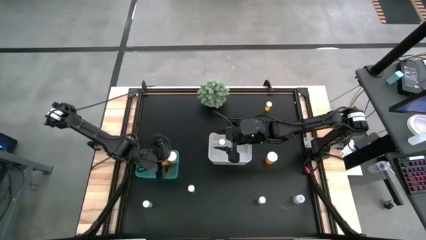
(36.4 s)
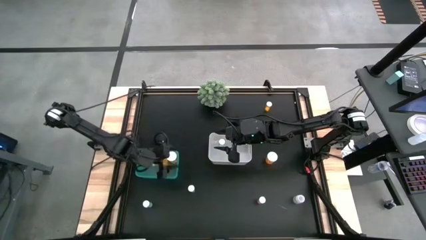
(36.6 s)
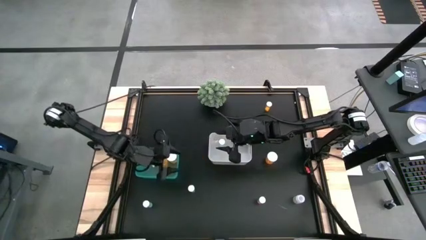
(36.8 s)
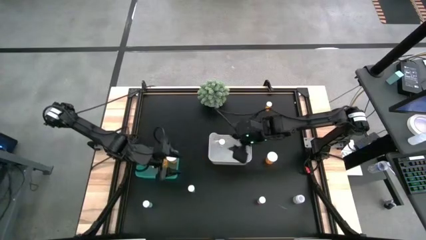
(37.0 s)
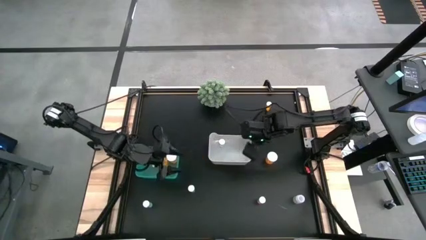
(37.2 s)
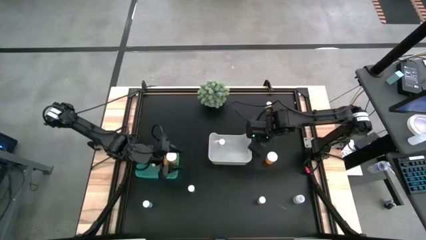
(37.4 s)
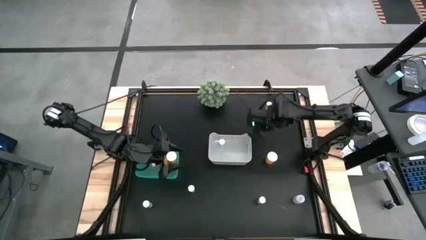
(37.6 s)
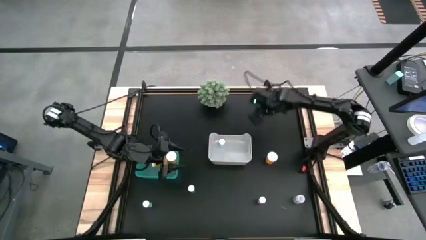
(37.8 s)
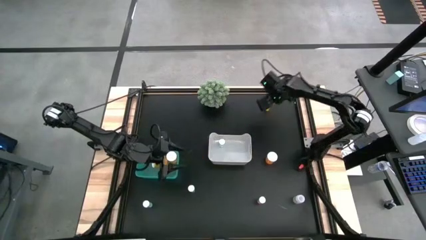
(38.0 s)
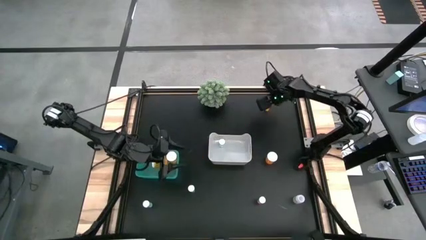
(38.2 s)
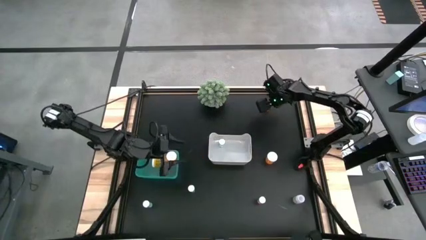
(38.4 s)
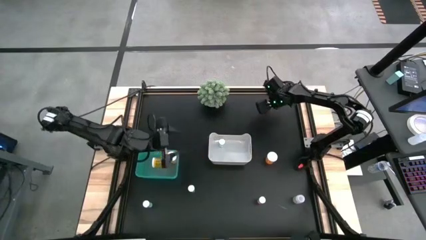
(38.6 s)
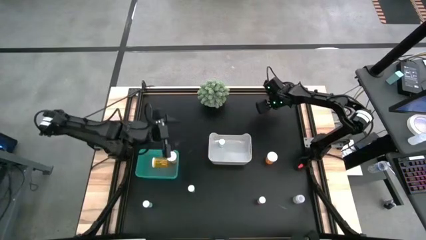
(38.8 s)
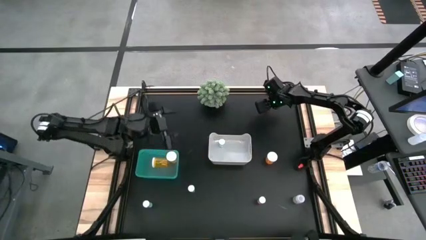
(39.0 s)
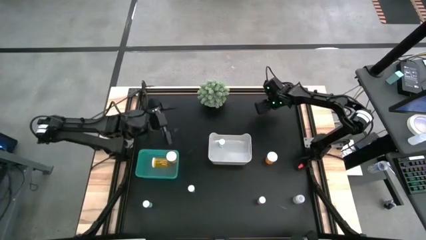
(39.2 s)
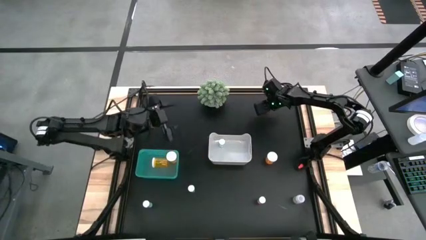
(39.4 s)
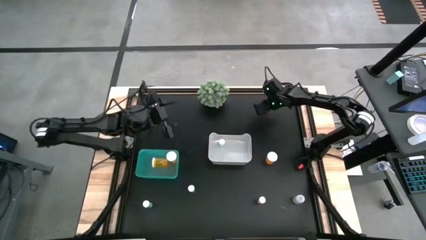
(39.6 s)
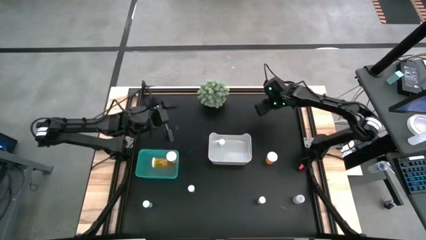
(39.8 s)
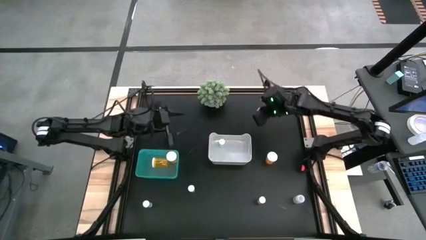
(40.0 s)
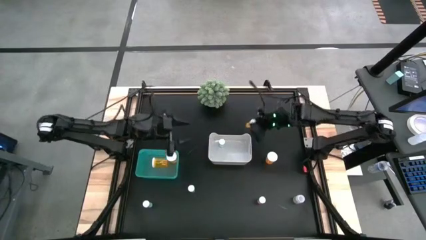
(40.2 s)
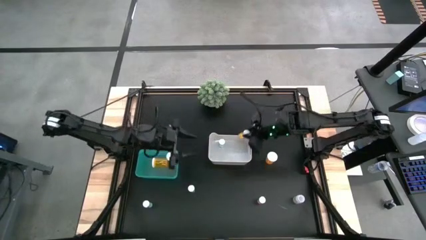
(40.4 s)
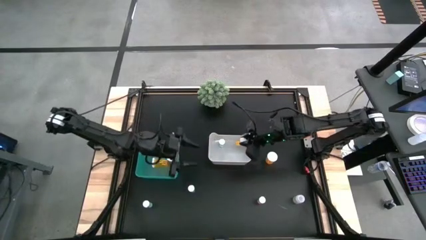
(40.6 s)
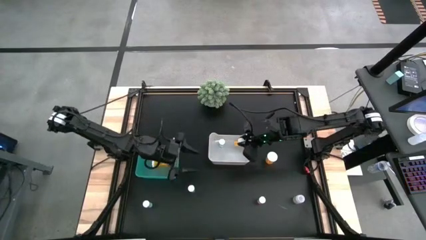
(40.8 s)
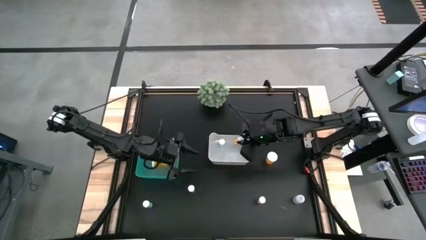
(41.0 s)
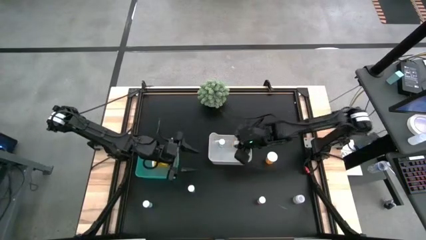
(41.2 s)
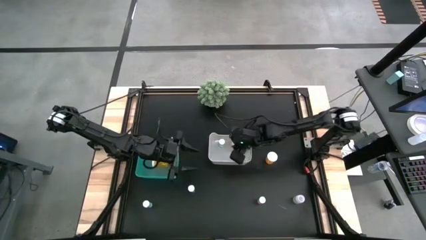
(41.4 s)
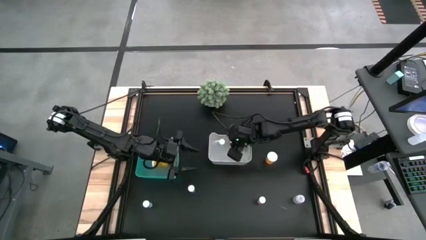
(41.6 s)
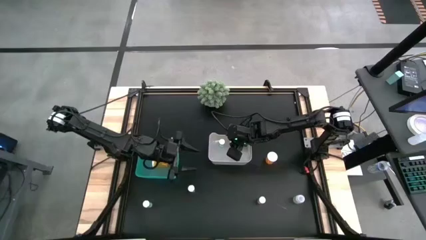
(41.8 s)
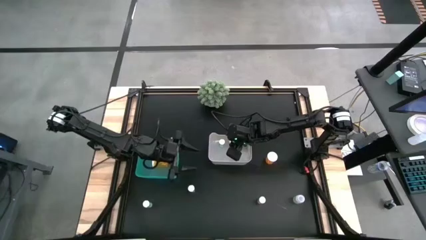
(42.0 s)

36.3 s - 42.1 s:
Task: Pick and place medicine bottles into bin by pill shape (circle, oval)
Put the orange tablet bottle into the white bin

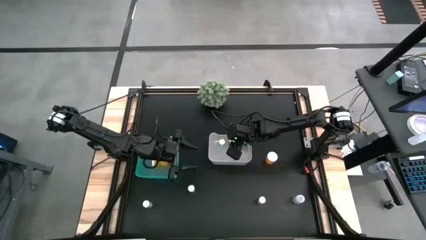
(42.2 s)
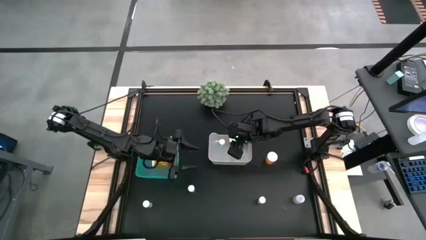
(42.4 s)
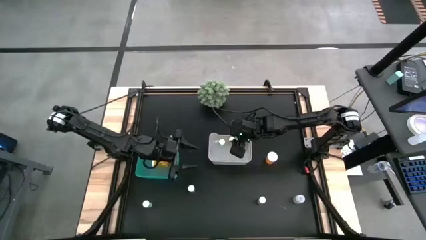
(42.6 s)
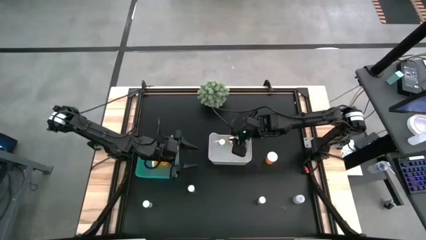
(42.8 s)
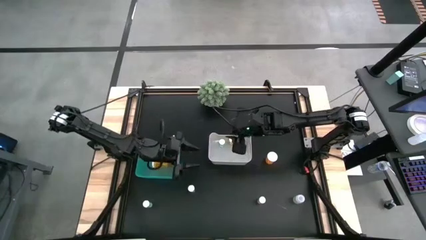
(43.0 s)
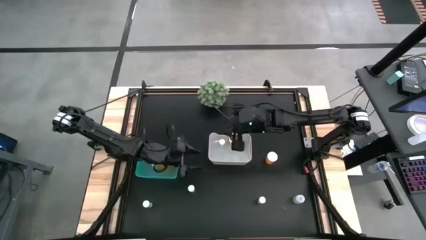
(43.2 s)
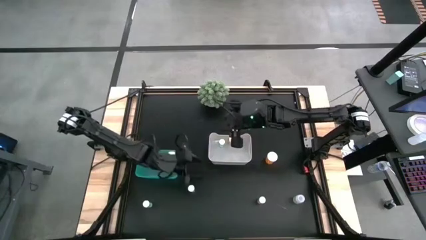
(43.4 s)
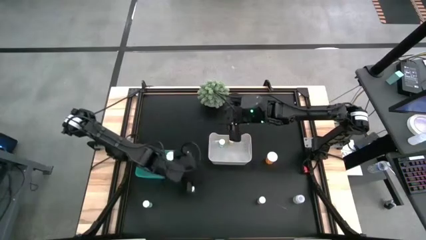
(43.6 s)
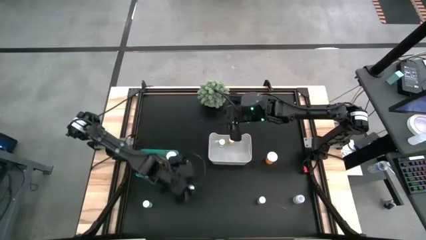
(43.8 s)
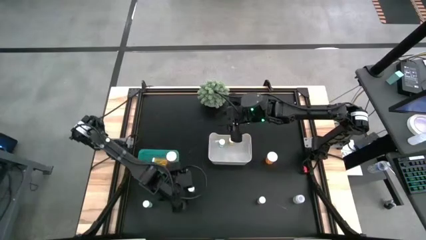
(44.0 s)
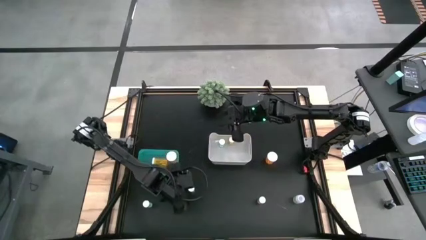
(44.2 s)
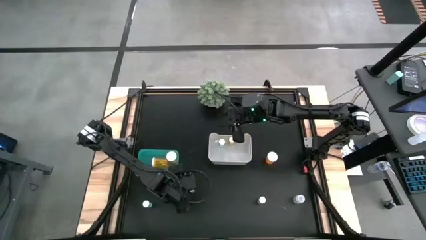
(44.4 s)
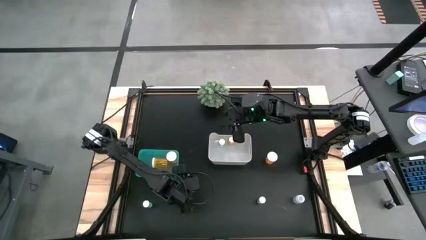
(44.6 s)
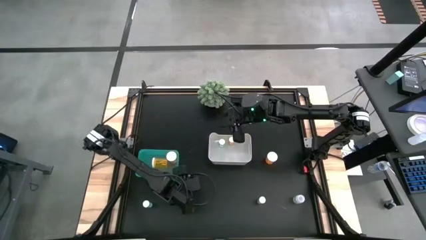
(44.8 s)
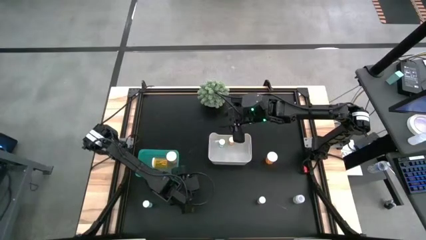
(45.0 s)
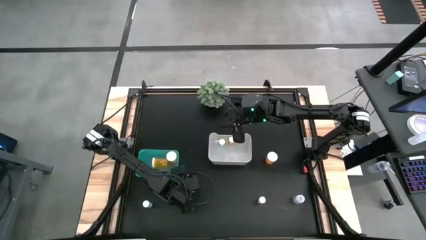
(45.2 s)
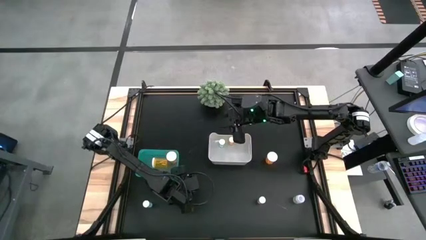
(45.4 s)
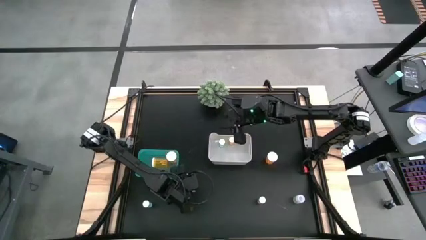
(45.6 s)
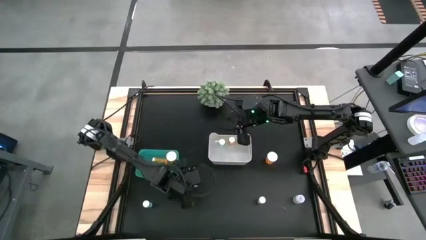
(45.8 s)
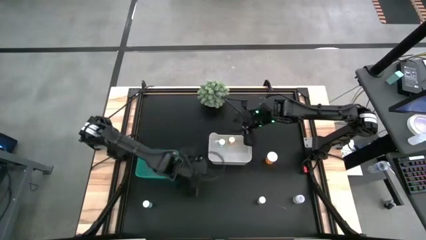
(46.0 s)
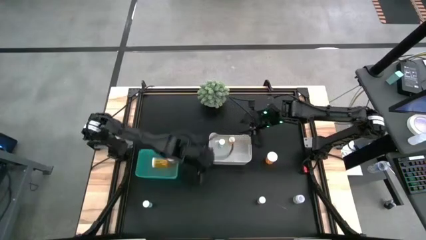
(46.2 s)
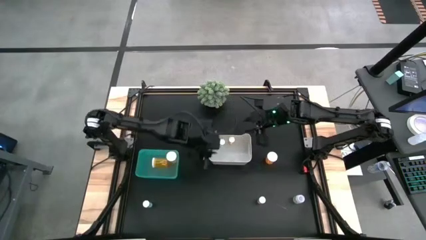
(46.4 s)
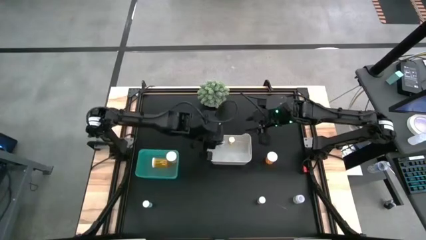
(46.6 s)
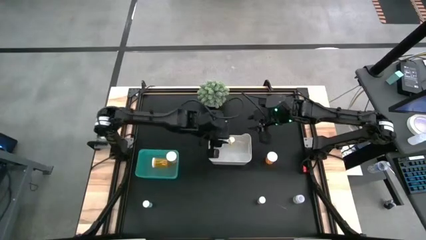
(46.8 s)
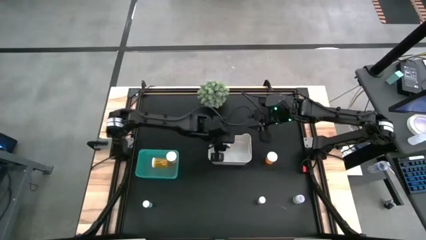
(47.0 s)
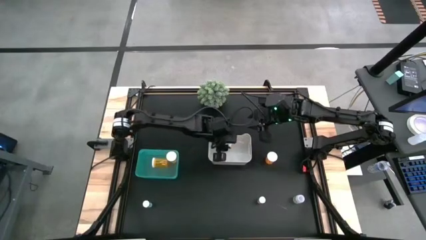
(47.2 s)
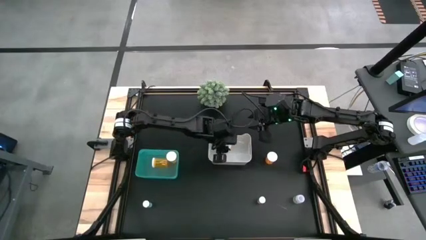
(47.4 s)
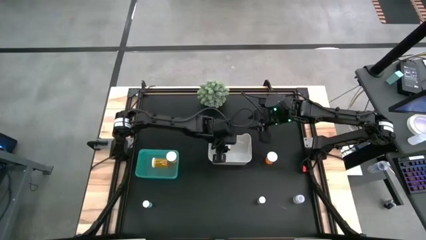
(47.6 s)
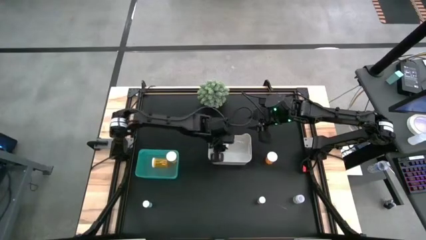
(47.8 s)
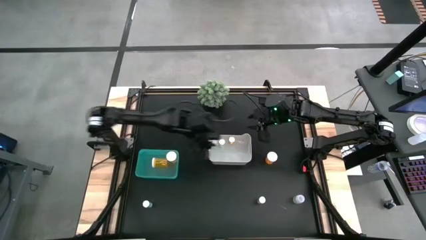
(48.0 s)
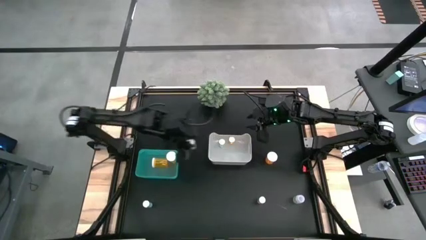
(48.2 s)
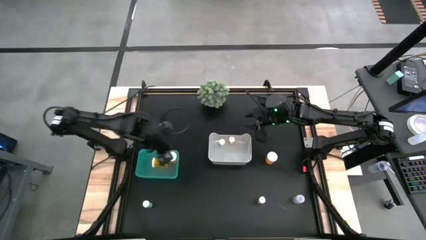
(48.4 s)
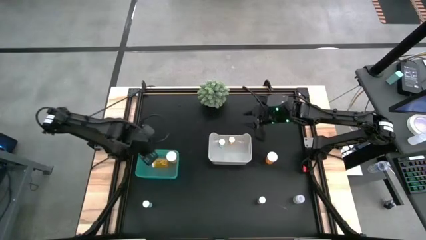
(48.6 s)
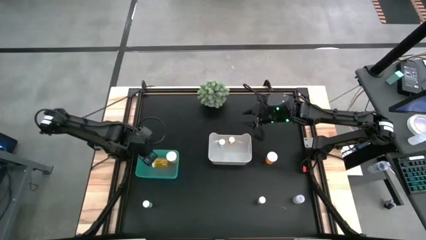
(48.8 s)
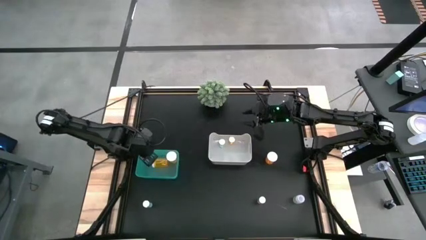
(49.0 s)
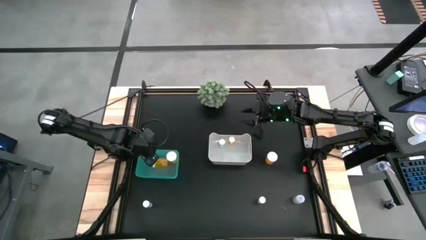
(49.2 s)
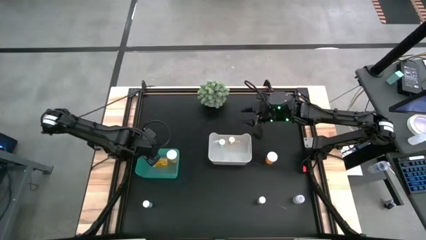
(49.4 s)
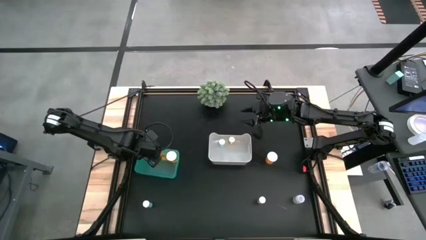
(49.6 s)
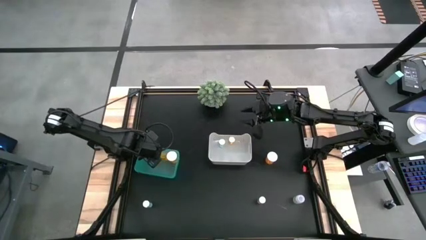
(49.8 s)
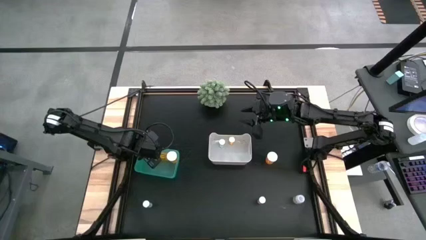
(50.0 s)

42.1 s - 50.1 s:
Put the blue tablet bottle into the white bin

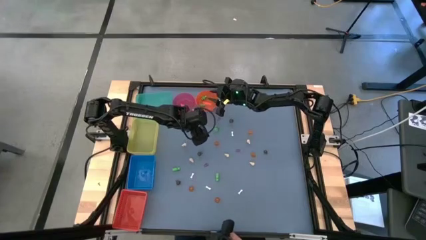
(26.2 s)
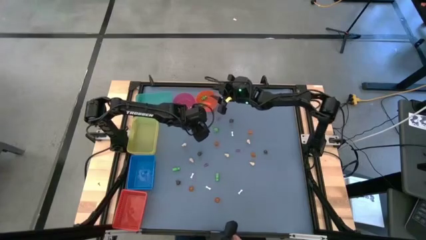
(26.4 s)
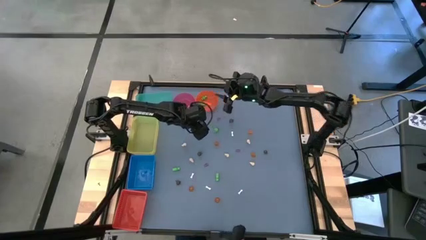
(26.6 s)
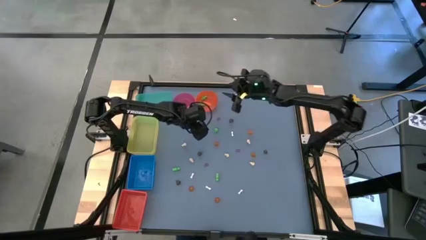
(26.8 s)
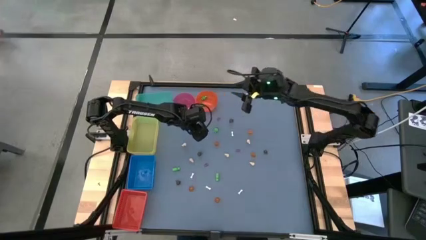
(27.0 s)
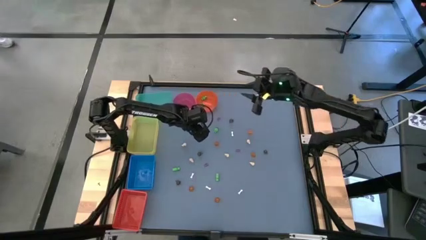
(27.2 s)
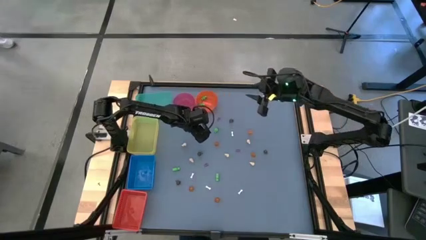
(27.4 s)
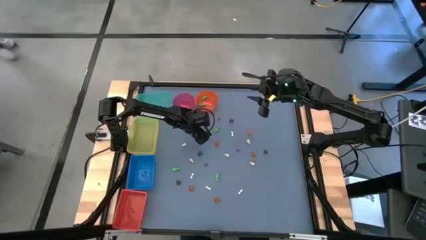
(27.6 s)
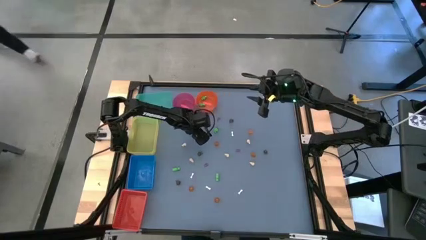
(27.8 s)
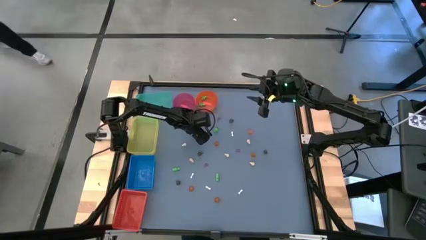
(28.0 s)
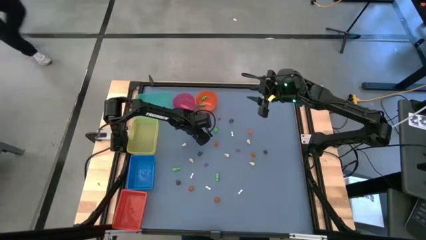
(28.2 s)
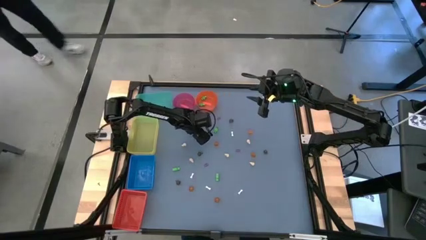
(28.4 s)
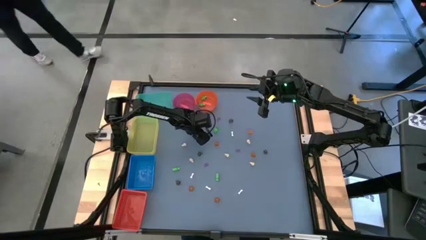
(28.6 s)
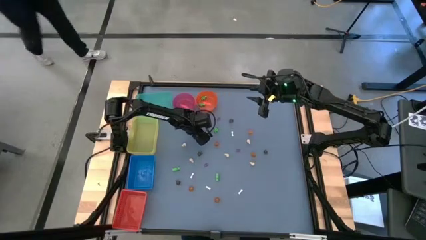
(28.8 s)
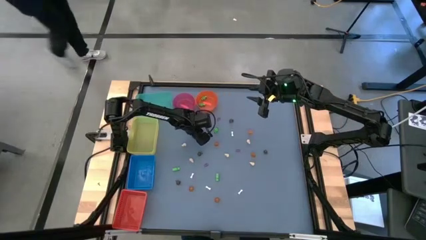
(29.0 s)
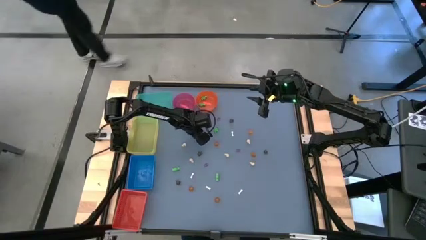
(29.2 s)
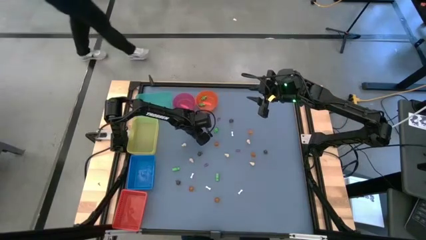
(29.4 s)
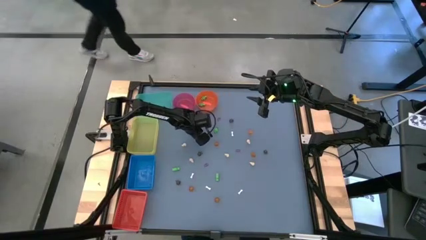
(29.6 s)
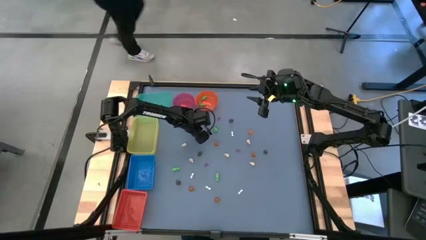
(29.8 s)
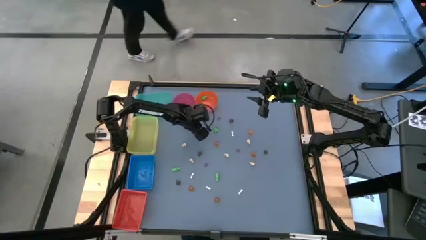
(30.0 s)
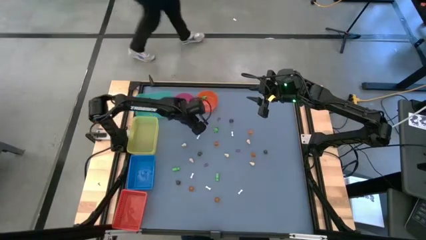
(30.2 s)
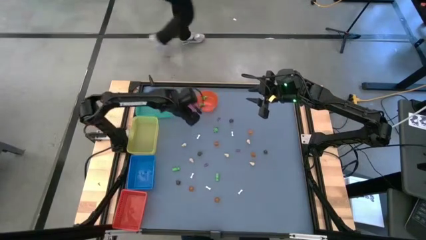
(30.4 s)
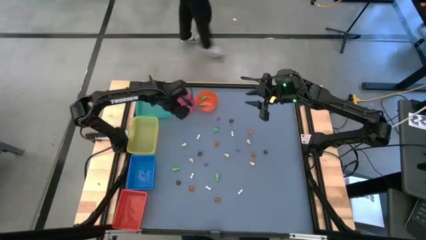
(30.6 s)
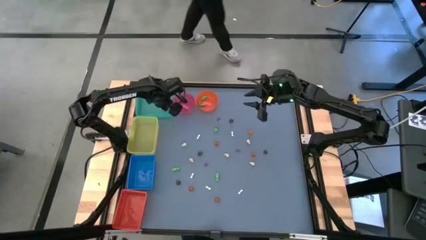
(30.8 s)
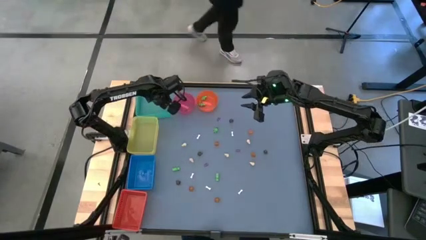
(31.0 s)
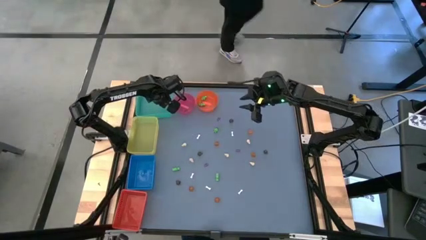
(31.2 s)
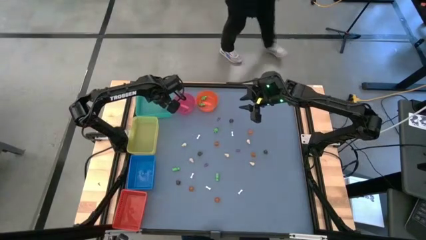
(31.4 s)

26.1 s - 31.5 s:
Task: Sort Halloween decoration
Put the black skull toy into the green bin
